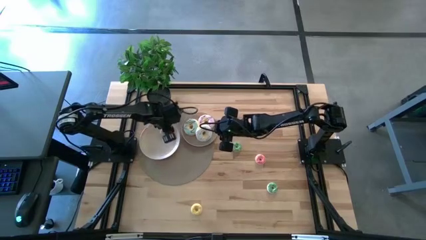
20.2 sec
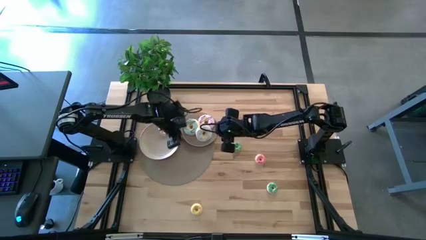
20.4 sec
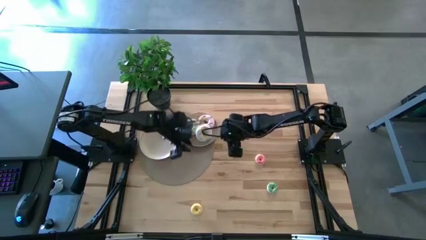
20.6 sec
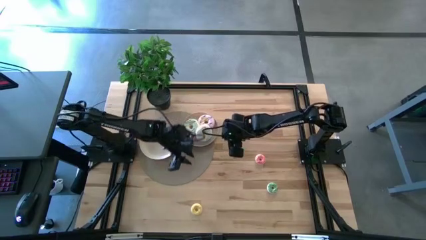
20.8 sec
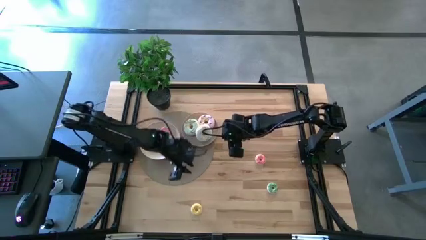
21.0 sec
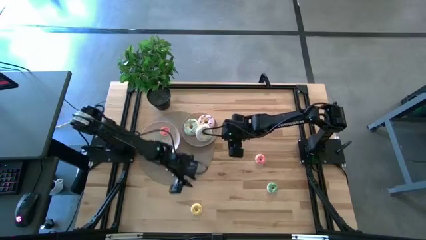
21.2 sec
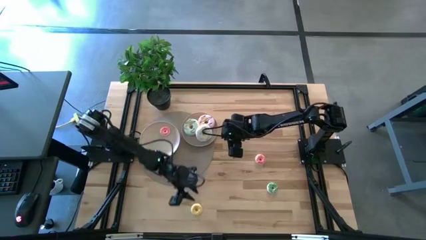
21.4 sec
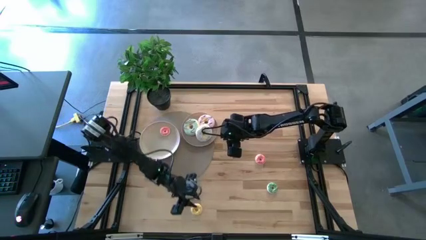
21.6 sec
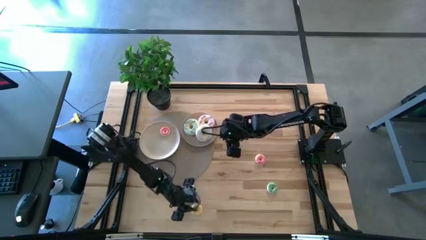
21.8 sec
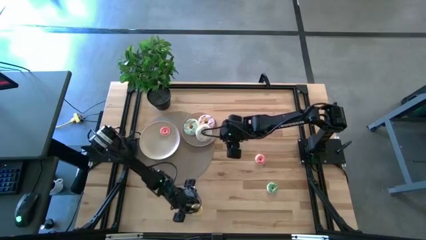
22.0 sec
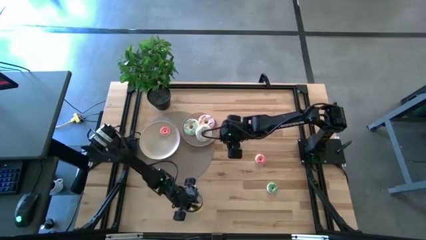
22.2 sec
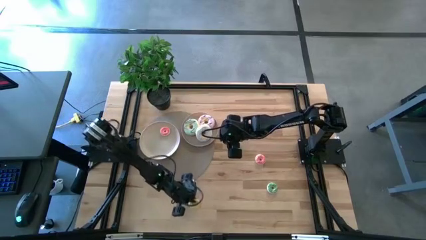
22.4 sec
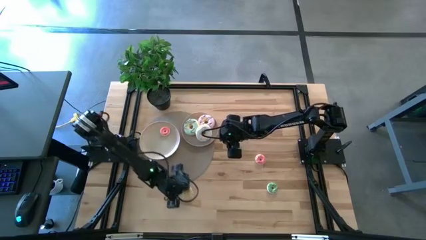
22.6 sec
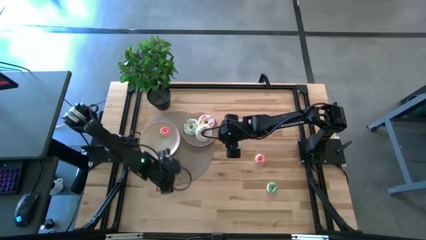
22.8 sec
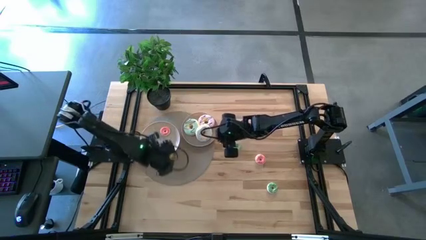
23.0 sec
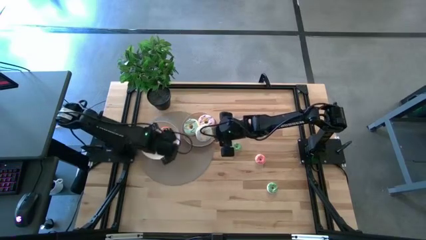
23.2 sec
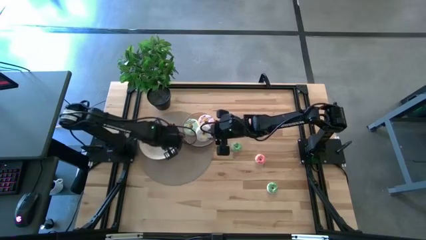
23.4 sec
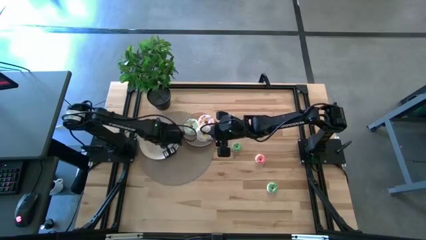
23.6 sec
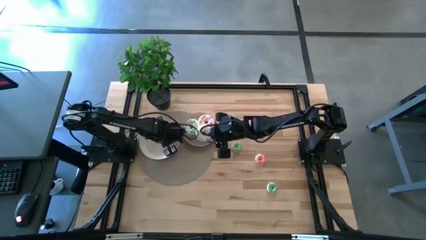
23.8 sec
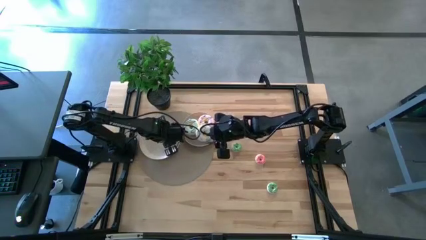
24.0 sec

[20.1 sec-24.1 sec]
Task: Pick & Place donuts
Put the small yellow donut on the white plate

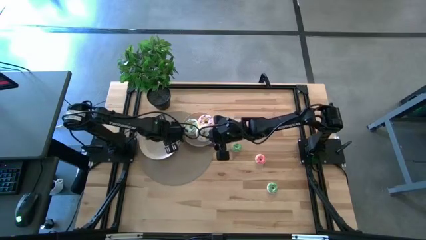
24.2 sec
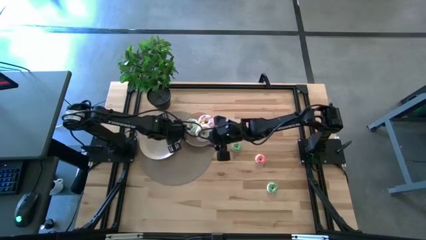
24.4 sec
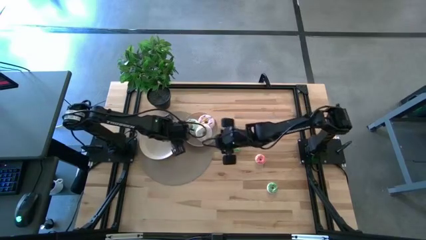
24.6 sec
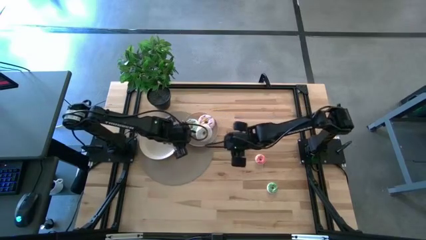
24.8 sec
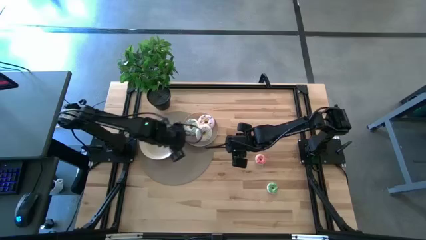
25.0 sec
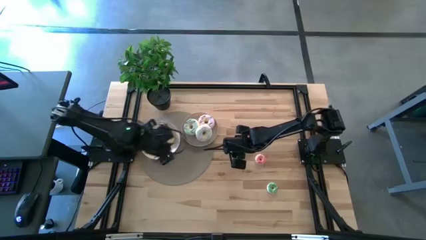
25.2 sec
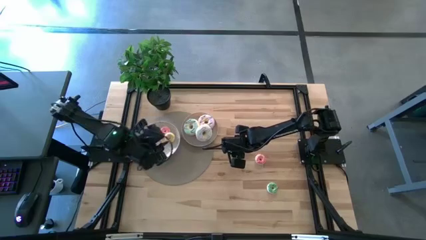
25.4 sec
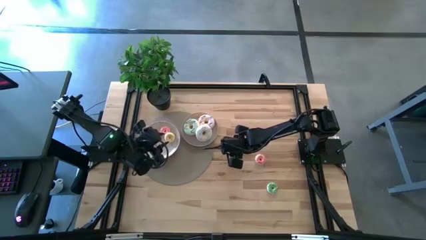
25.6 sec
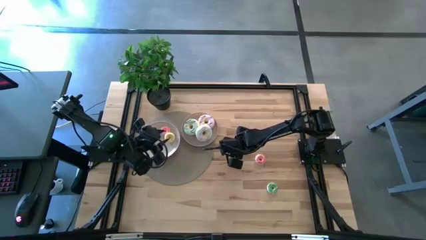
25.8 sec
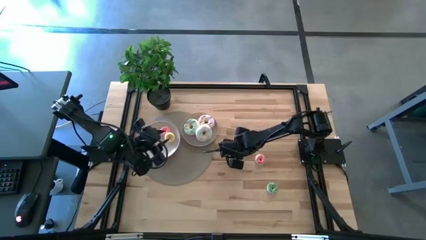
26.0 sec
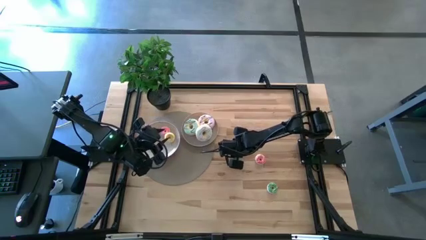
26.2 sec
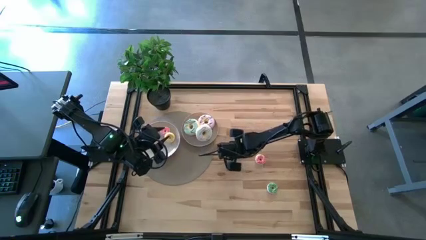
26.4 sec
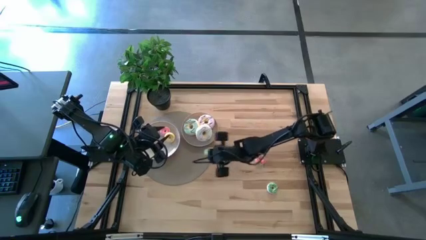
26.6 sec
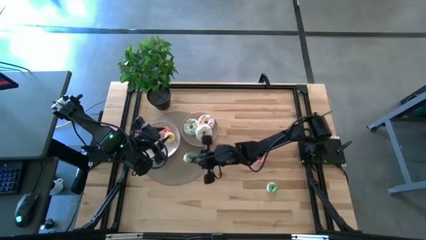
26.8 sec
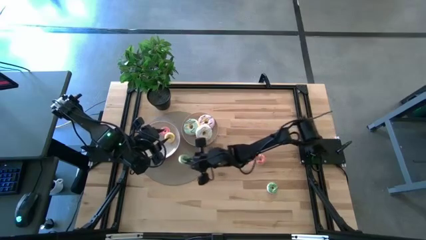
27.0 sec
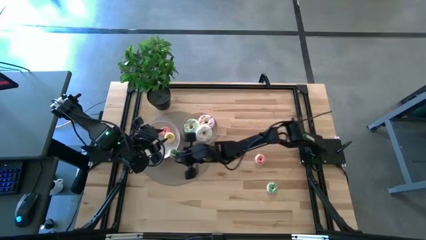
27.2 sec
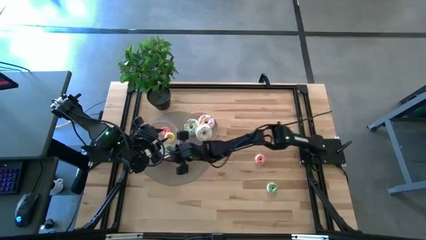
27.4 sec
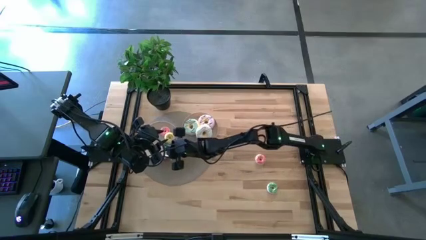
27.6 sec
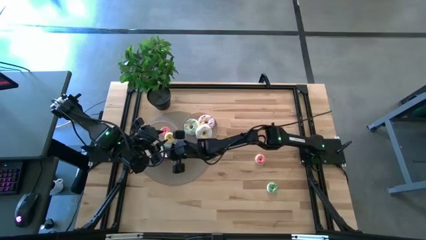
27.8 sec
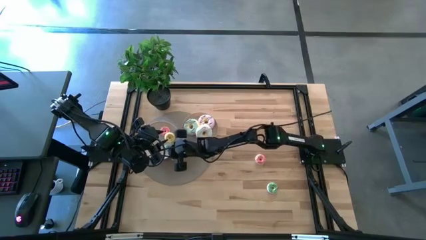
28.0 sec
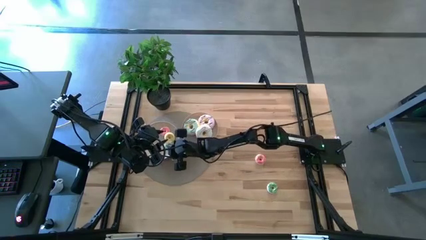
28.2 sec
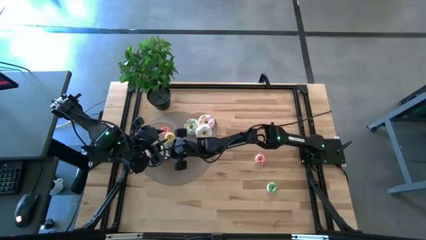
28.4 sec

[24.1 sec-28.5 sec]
Put the top small green donut on the white plate

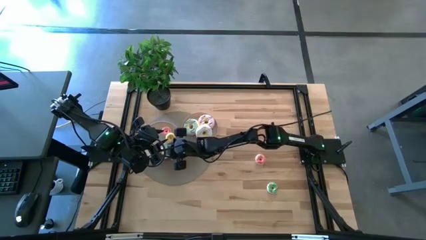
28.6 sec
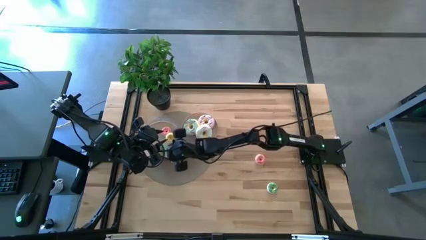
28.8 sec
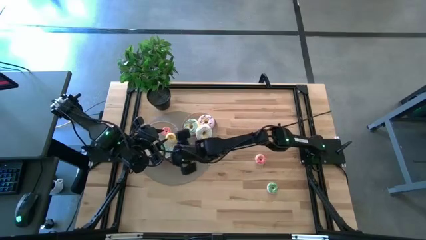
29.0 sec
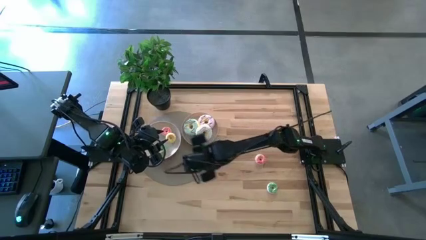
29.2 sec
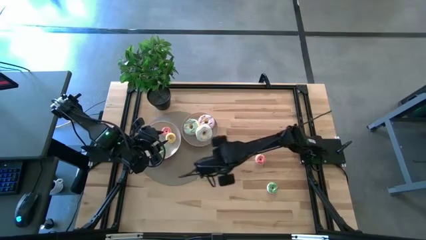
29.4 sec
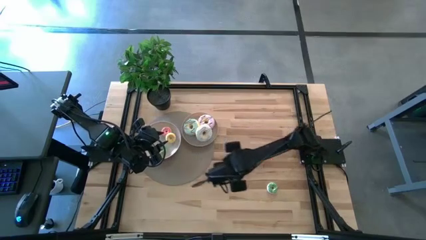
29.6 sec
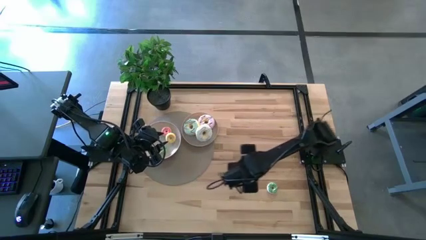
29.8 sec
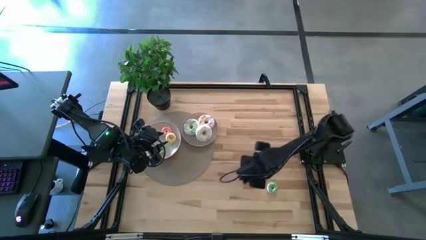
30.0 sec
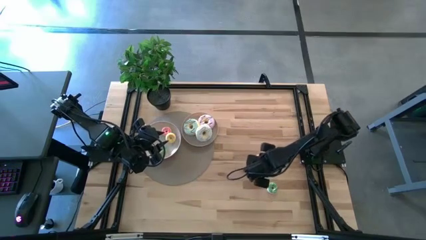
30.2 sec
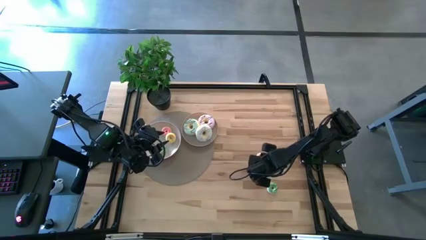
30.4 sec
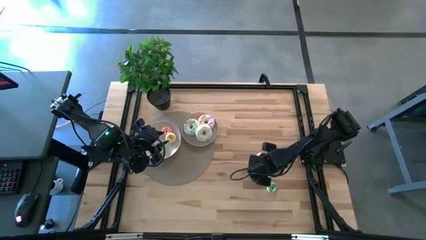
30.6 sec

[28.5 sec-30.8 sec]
Put the small pink donut on the white plate

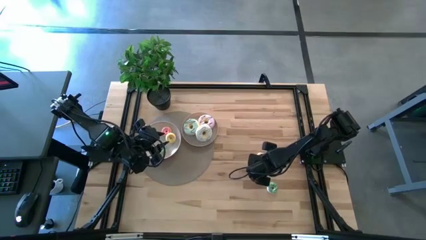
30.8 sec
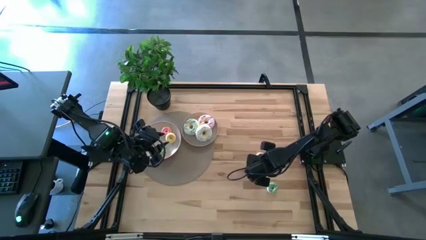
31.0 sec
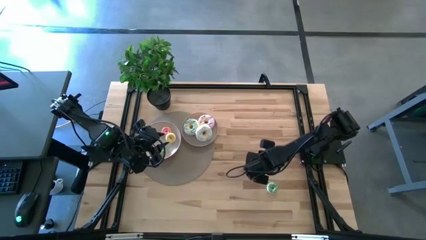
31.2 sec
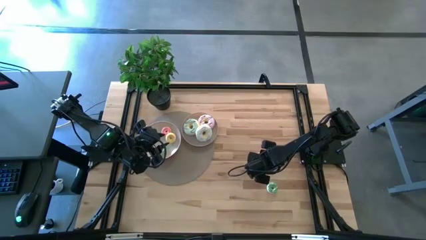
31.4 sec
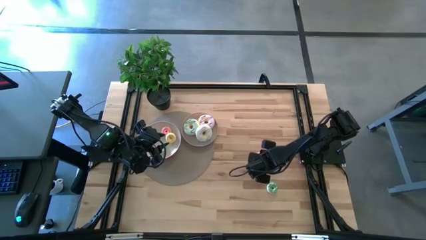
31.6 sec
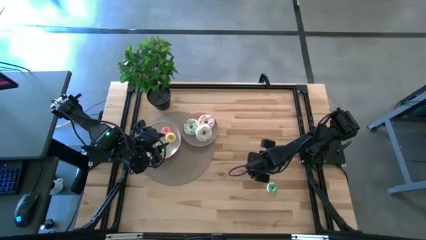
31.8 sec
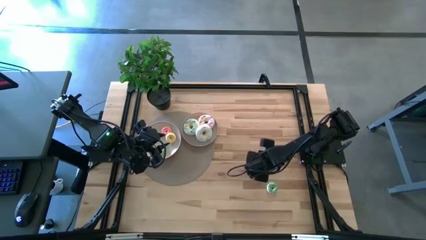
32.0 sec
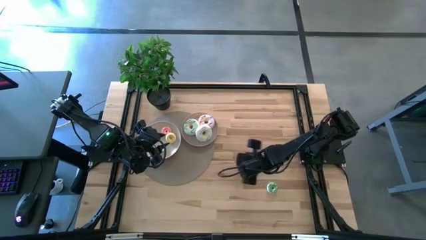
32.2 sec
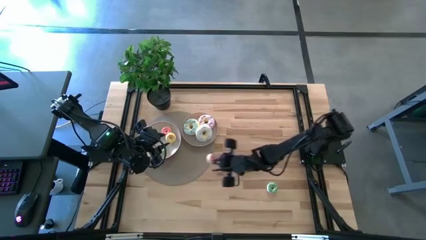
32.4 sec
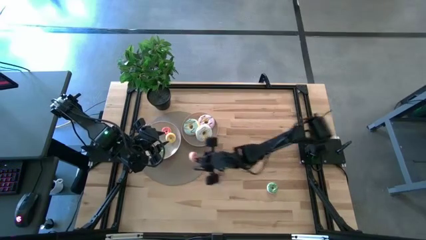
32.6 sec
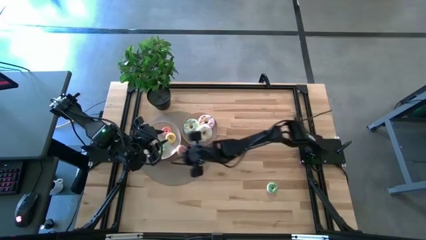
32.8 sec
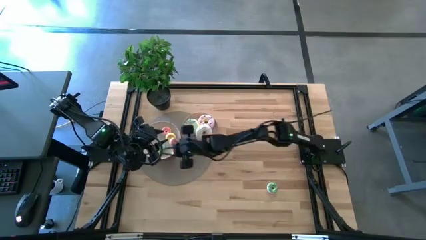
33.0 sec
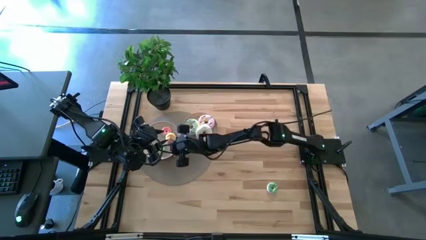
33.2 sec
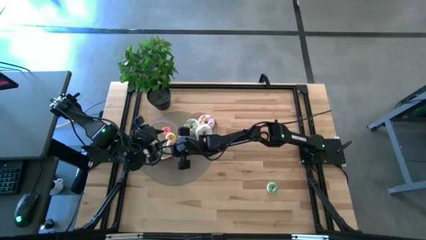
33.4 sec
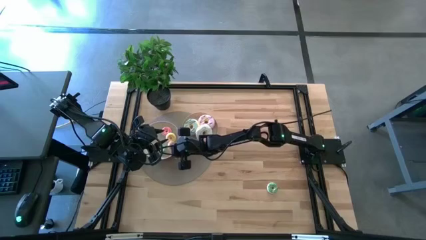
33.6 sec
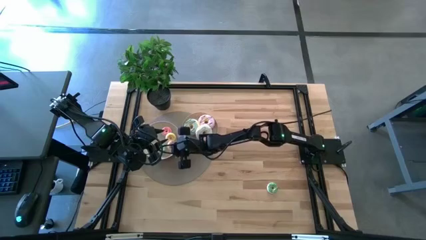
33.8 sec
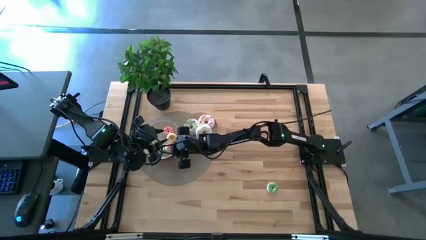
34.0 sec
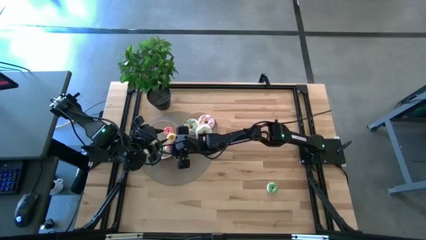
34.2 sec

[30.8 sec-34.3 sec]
Put the small pink donut on the white plate

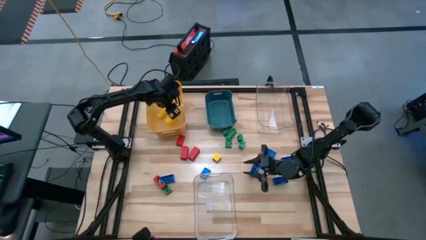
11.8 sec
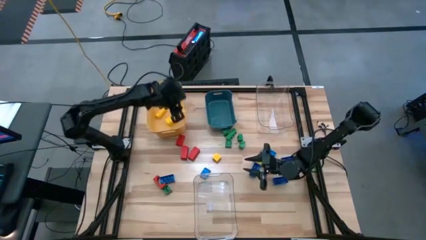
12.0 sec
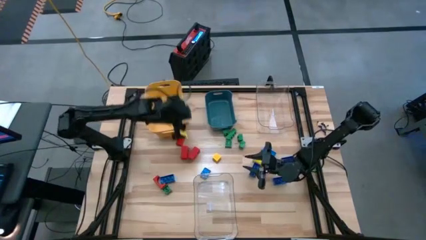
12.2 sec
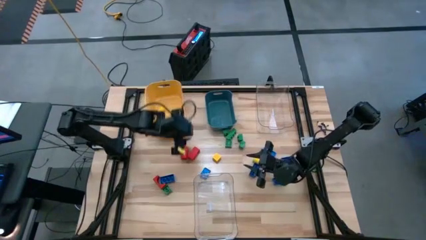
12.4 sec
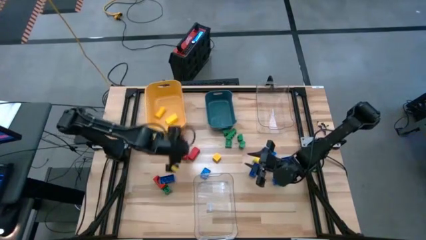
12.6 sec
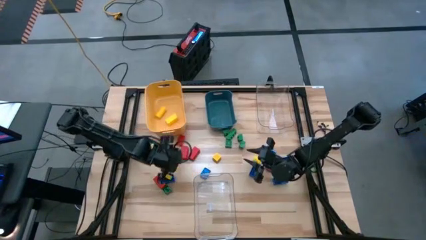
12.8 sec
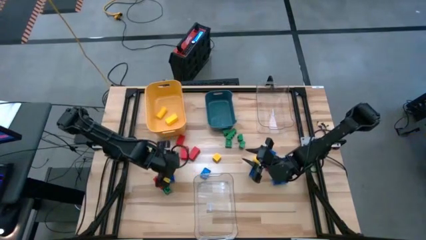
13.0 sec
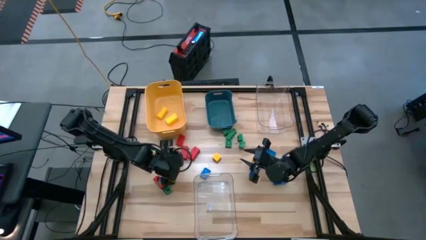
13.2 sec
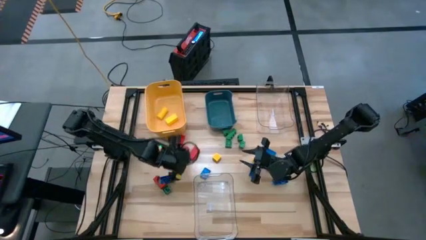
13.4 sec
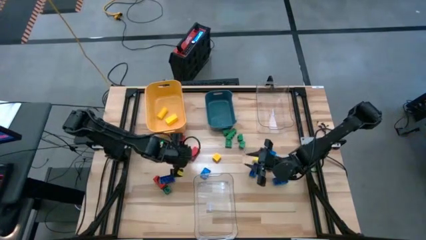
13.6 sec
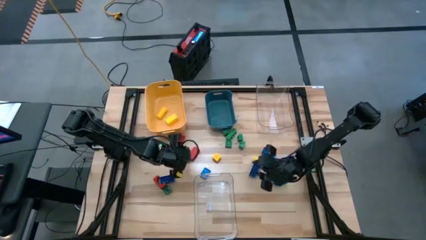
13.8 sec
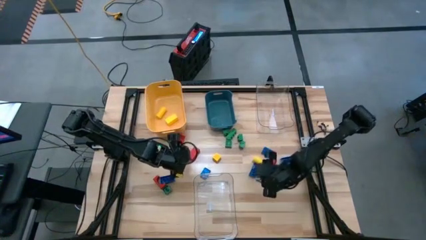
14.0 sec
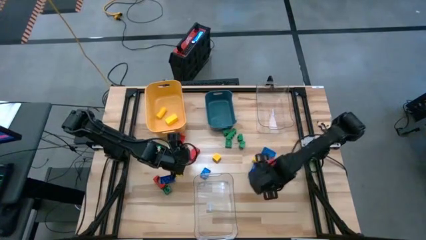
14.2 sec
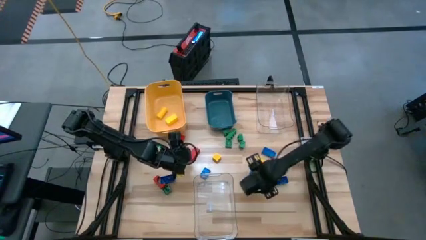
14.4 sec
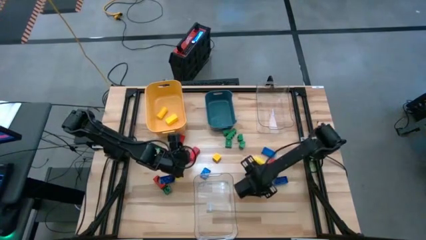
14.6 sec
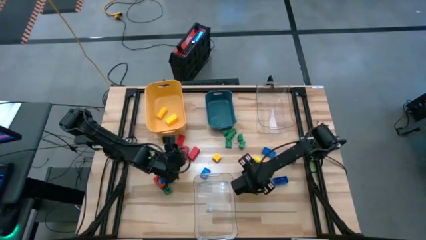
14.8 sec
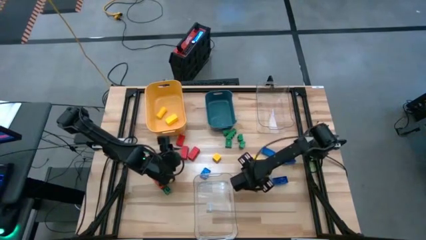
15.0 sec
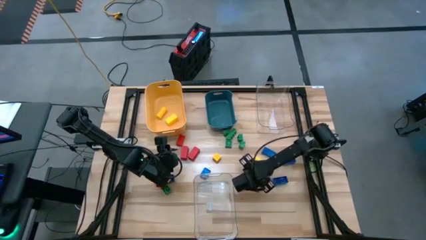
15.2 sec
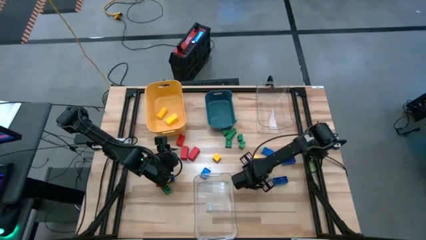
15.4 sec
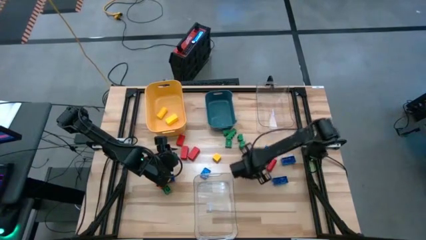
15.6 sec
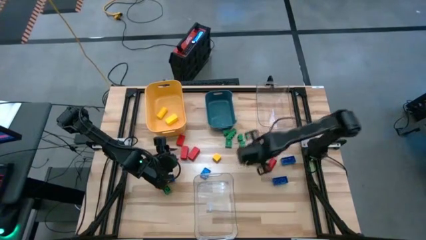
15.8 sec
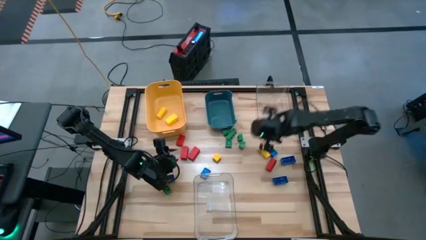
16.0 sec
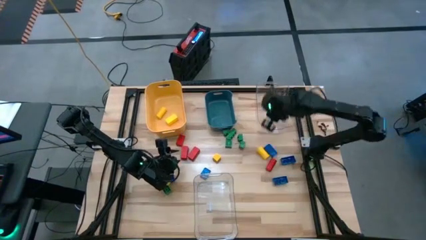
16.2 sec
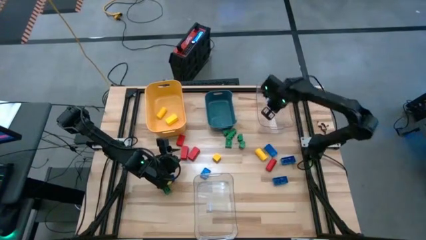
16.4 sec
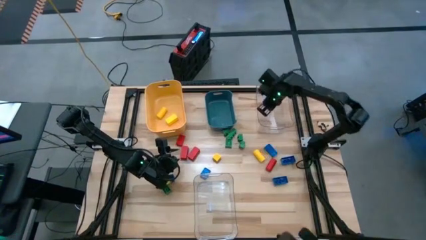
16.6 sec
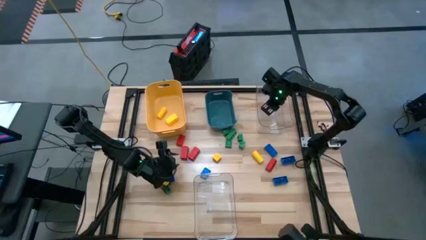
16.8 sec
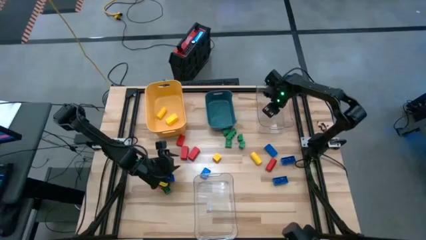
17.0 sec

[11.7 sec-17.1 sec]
Task: Sort blocks
Put the blue game piece into the top transparent bin
